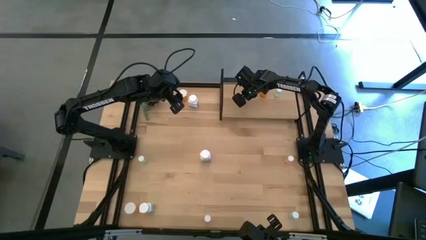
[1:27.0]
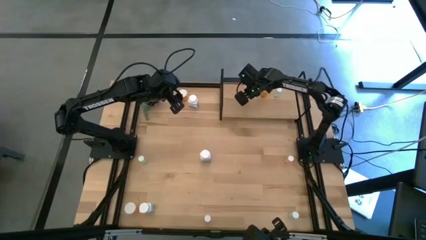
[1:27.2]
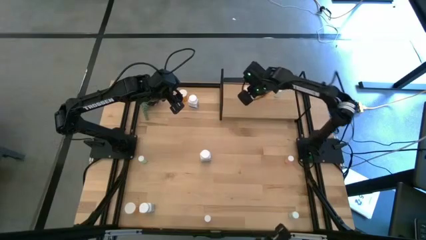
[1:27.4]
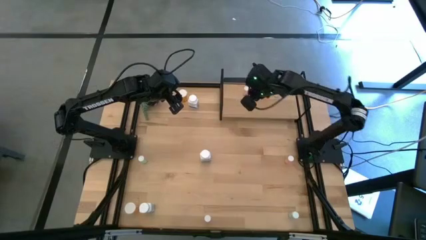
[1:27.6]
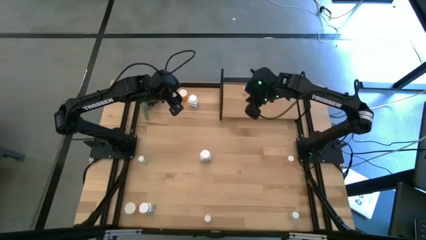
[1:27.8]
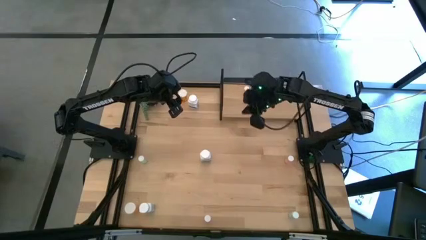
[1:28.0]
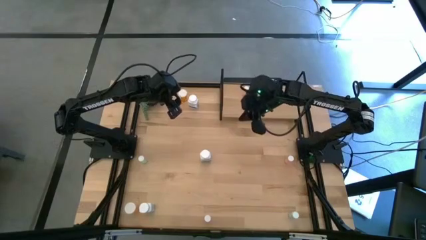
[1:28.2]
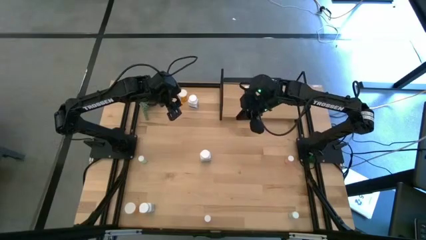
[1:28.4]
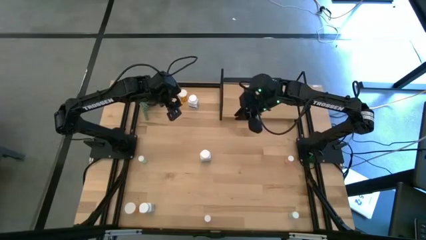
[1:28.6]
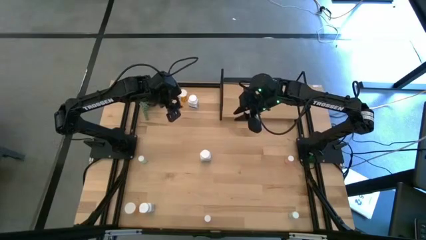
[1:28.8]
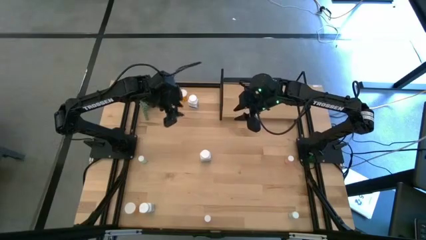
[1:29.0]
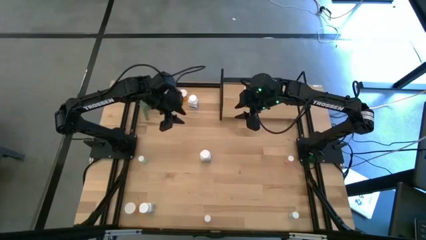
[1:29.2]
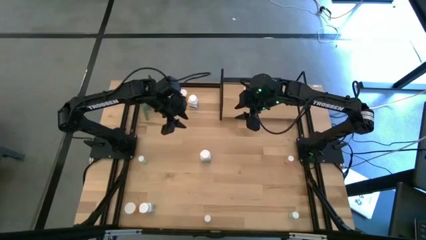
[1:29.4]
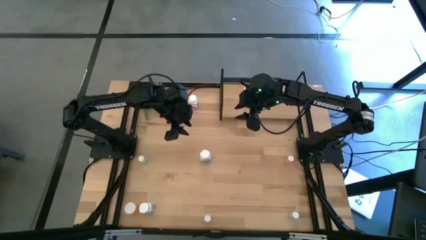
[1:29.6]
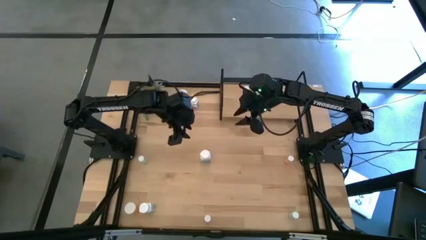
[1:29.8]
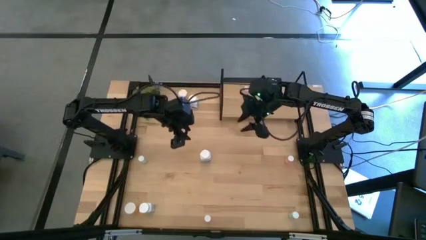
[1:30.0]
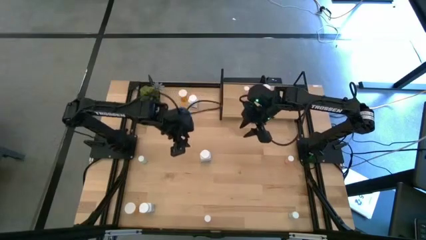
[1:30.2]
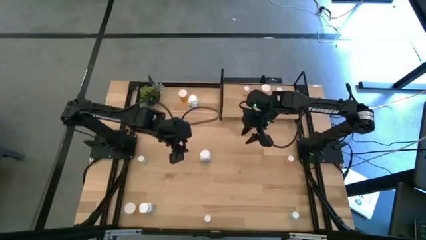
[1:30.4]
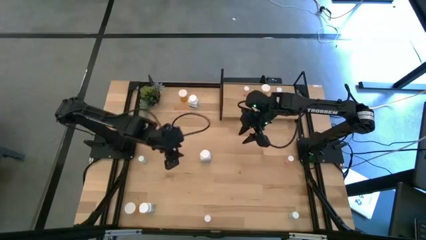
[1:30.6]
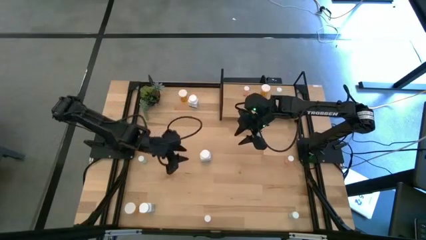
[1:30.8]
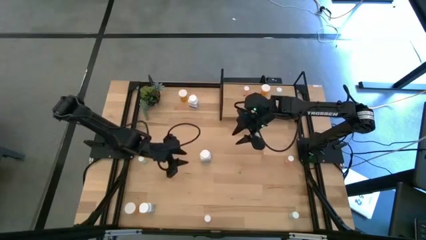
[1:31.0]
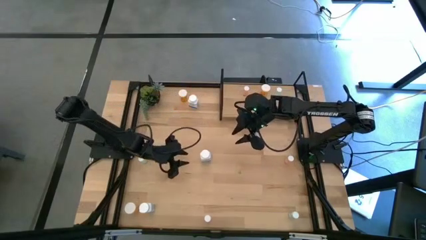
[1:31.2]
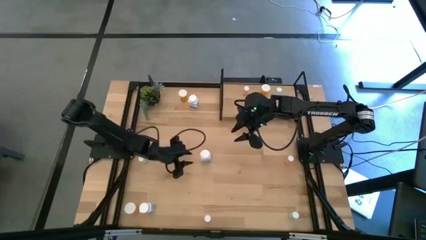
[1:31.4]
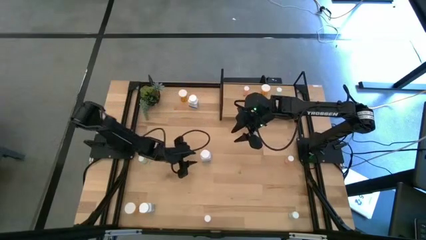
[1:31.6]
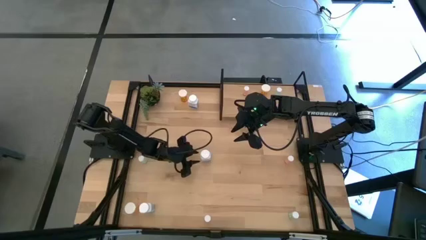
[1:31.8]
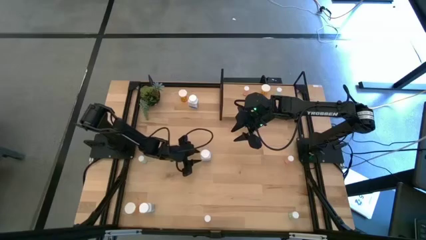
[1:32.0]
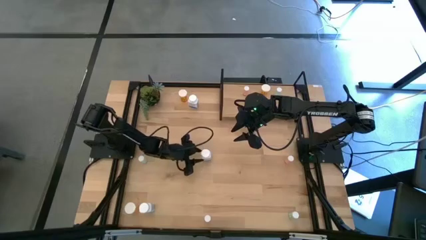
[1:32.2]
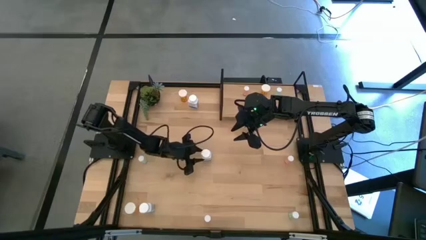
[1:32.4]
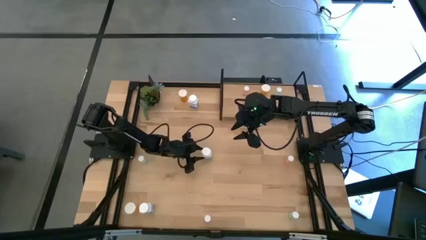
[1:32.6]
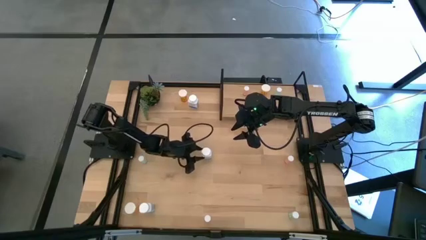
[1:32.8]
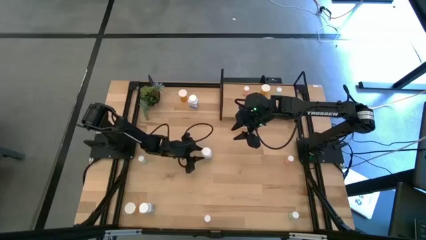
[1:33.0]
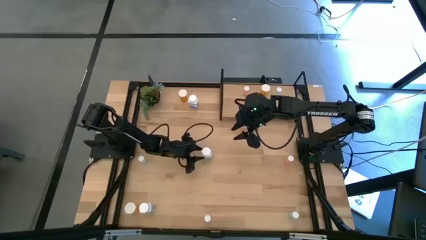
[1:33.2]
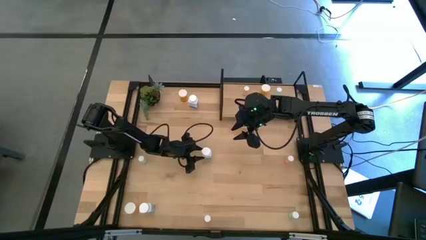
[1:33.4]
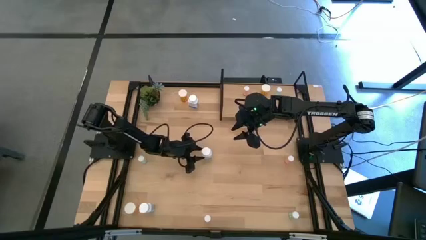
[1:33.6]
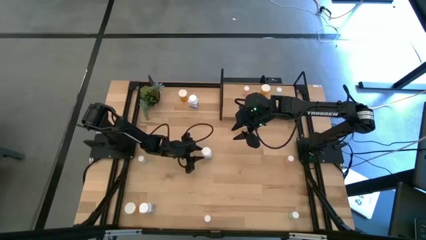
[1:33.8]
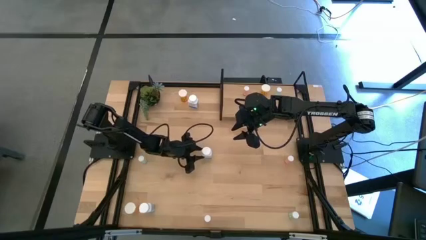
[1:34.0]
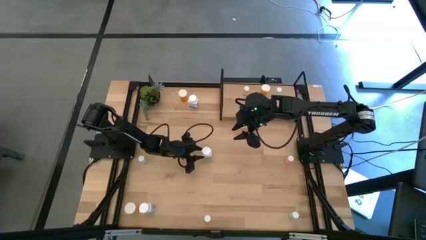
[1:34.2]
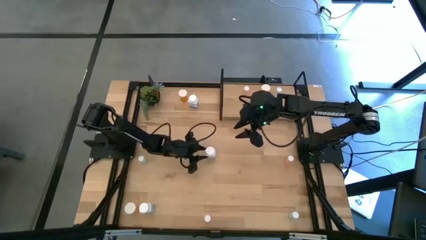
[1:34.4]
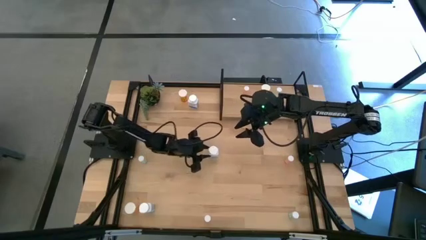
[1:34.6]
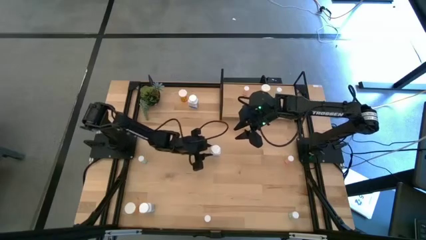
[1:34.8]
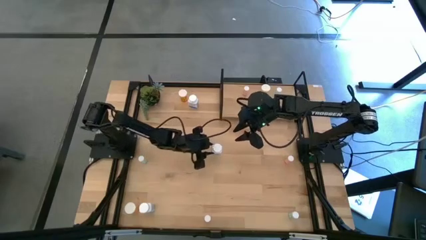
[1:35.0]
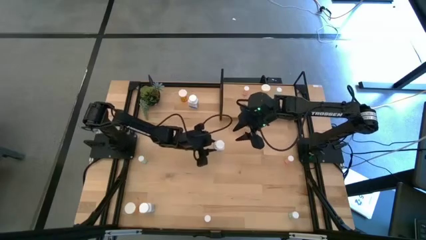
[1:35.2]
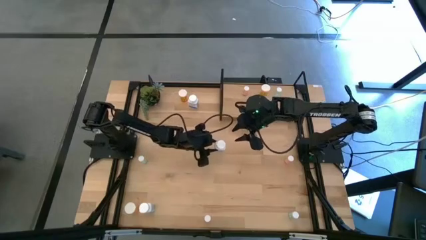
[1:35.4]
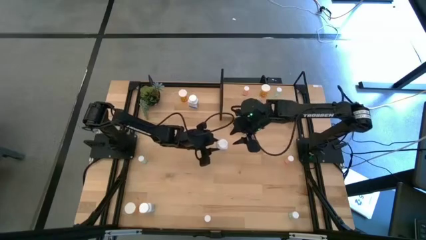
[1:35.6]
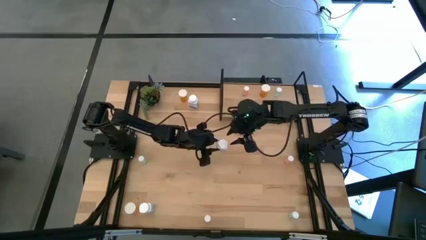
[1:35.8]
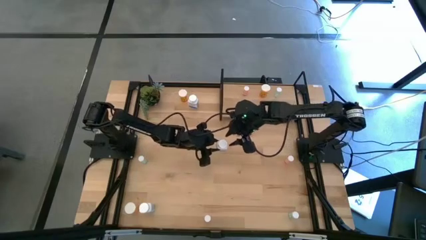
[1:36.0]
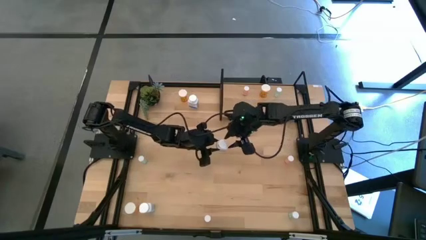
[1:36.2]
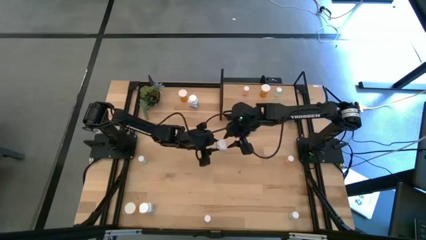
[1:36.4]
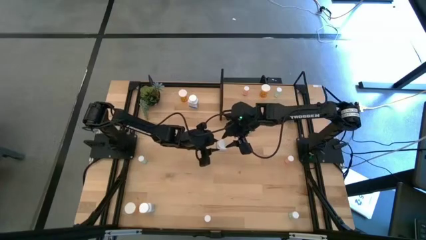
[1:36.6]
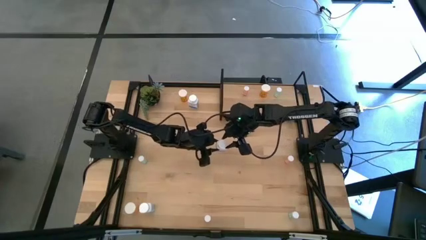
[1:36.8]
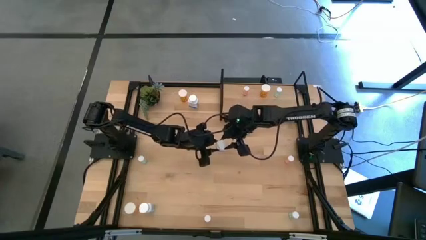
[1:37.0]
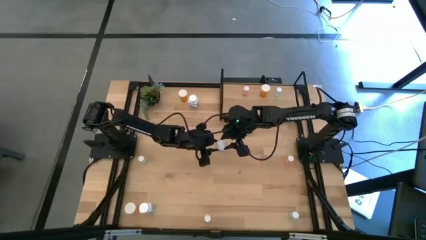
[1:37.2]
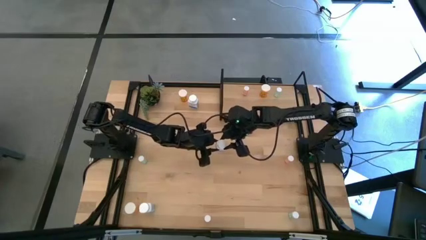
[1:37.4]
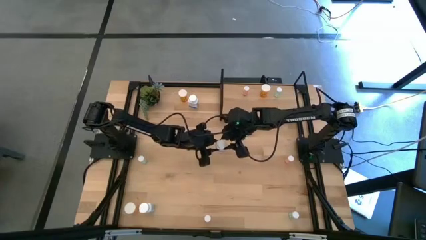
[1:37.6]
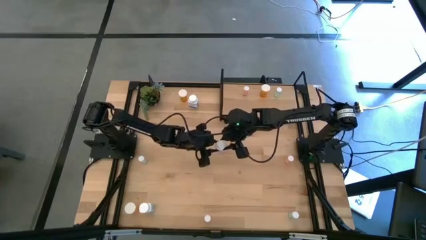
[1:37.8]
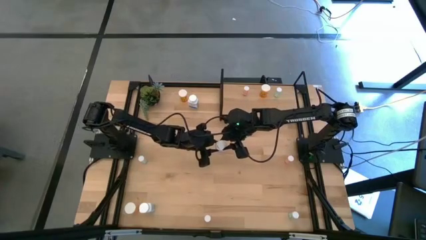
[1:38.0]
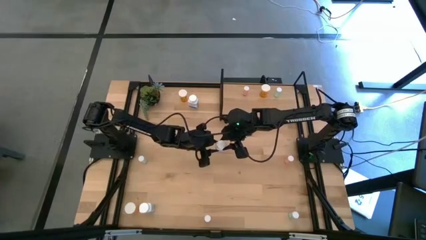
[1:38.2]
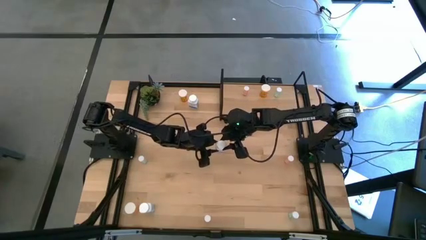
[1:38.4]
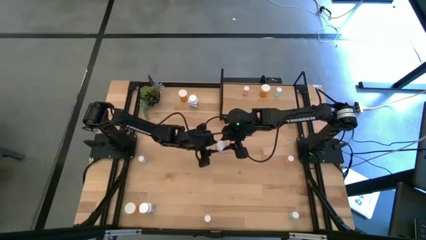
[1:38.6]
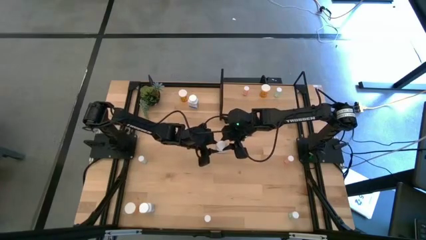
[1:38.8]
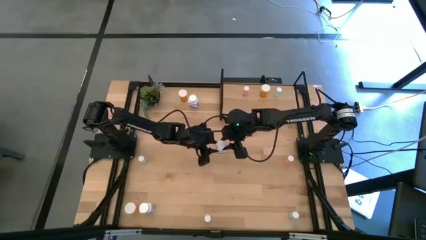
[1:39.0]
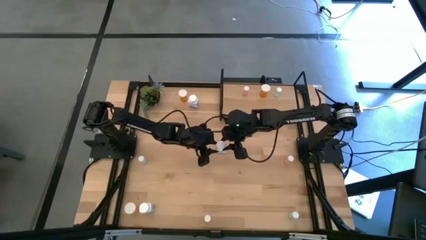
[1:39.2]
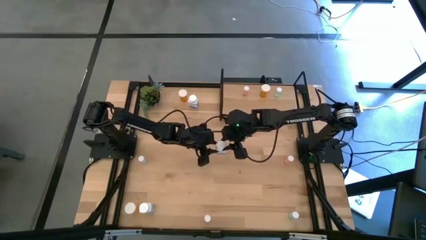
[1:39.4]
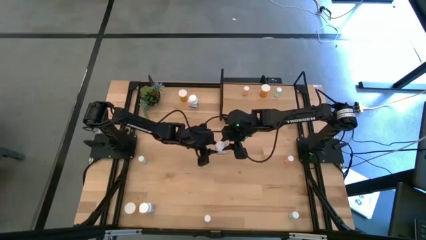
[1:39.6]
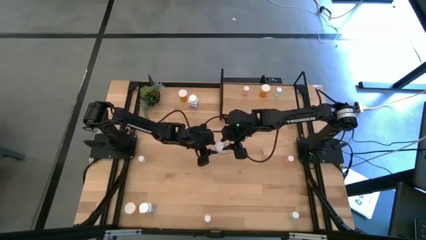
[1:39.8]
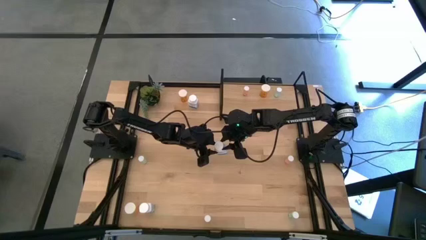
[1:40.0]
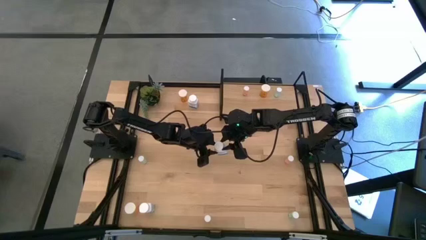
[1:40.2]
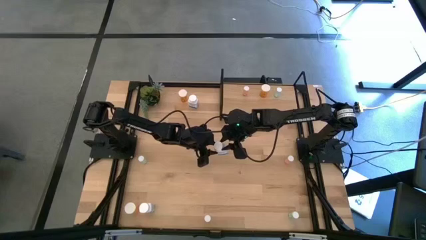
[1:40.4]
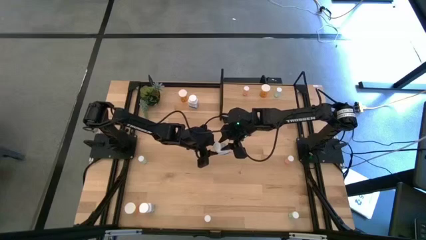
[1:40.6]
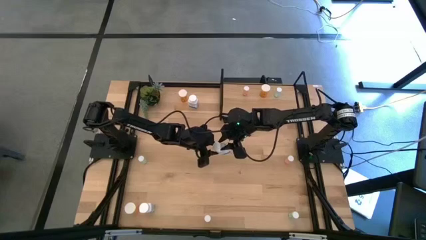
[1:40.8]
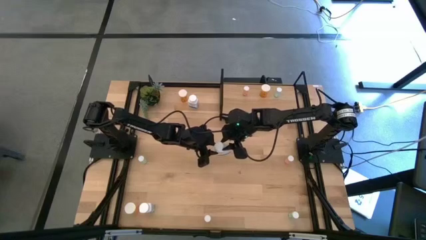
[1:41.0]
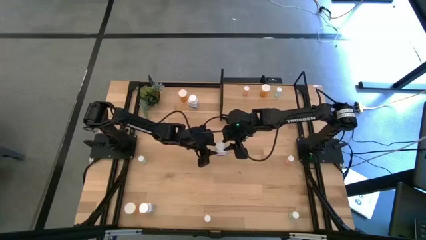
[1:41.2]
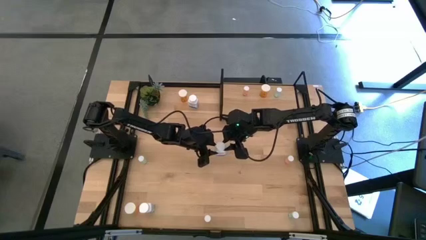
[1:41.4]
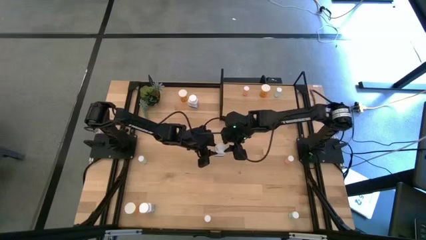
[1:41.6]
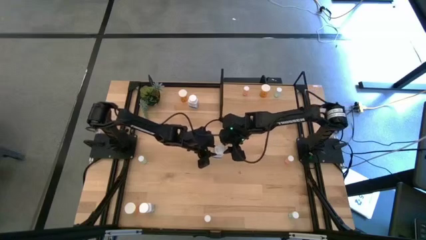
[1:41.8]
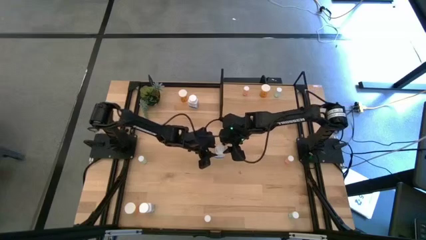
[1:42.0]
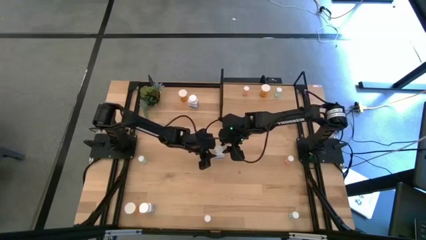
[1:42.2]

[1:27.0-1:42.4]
Task: Pick and place medicine bottles onto shelf by color
Put the middle white pill bottle on the shelf
